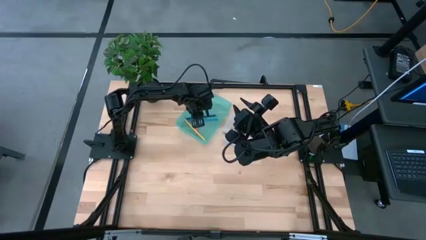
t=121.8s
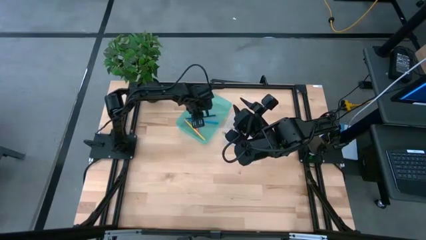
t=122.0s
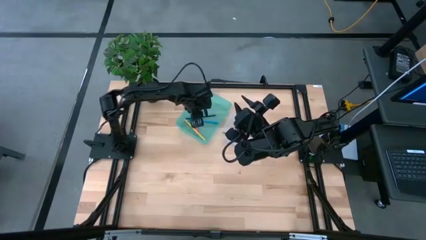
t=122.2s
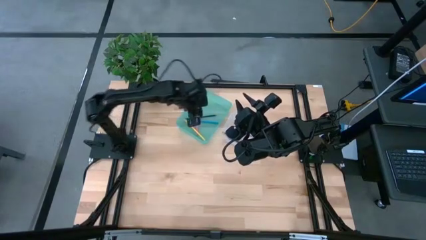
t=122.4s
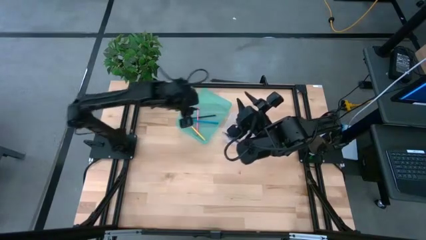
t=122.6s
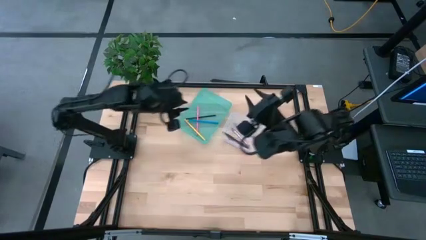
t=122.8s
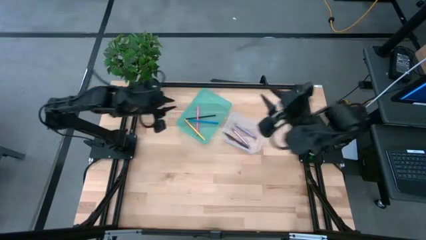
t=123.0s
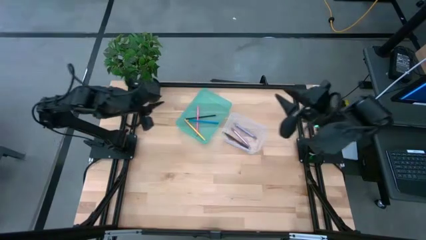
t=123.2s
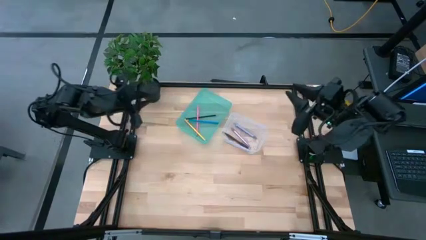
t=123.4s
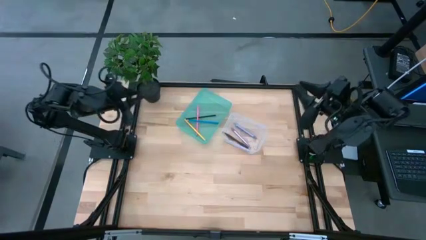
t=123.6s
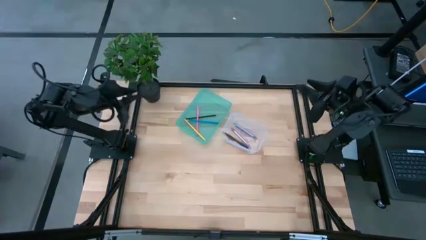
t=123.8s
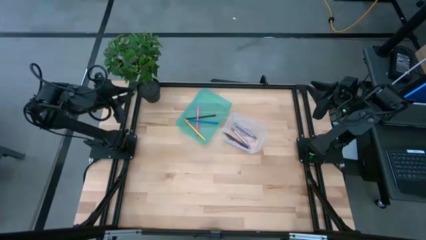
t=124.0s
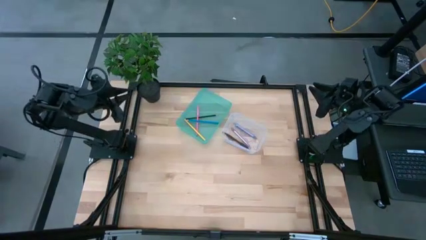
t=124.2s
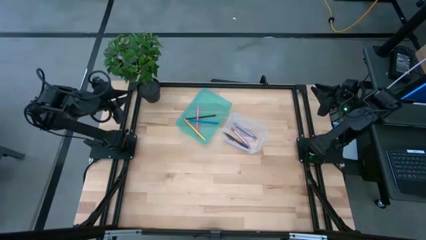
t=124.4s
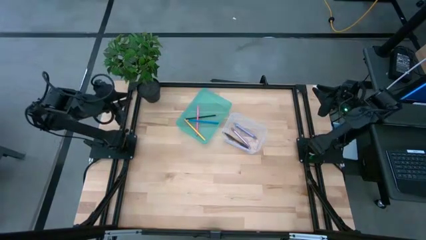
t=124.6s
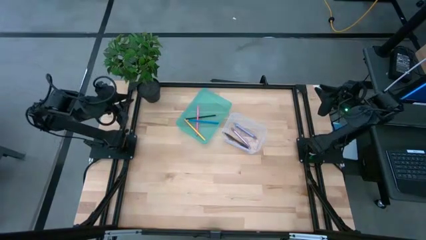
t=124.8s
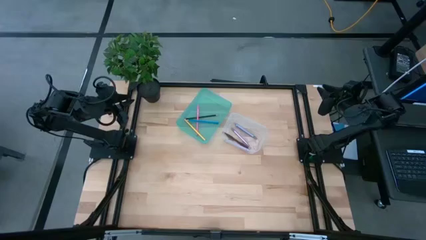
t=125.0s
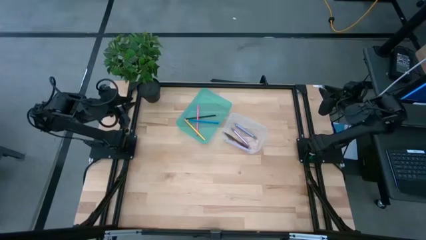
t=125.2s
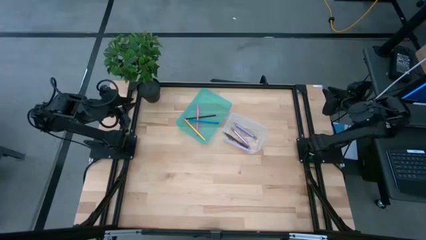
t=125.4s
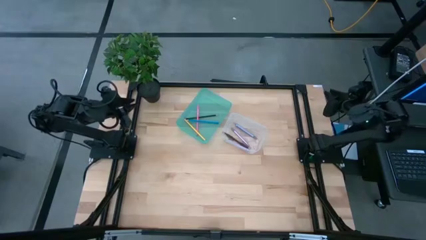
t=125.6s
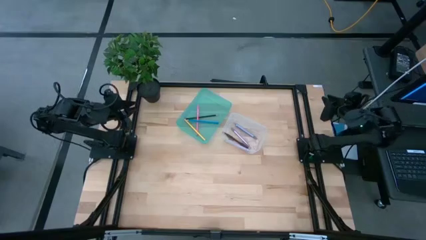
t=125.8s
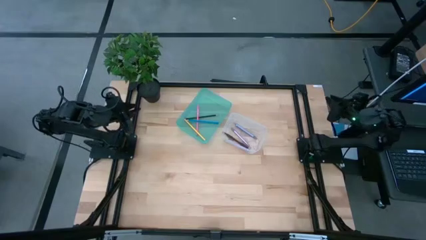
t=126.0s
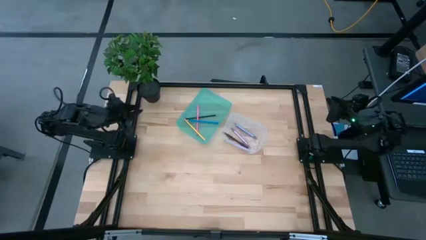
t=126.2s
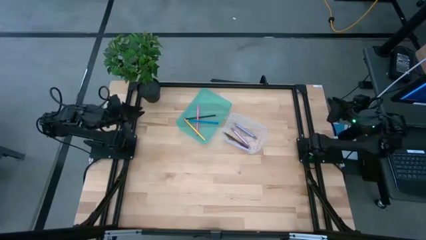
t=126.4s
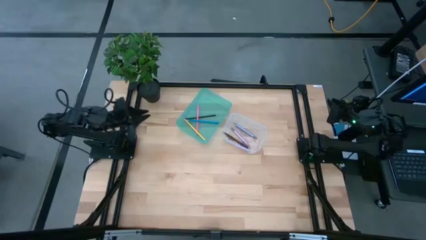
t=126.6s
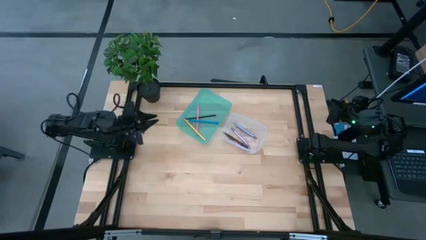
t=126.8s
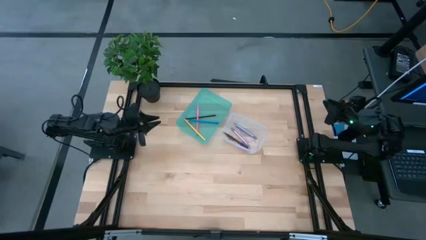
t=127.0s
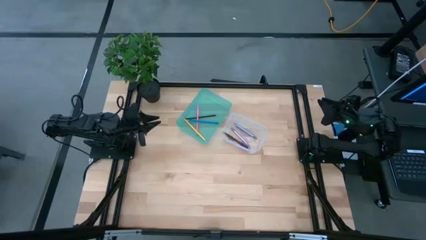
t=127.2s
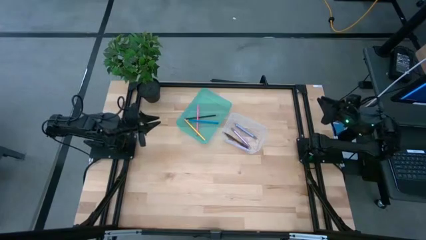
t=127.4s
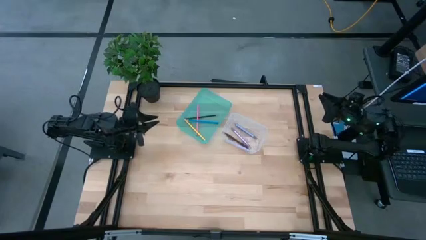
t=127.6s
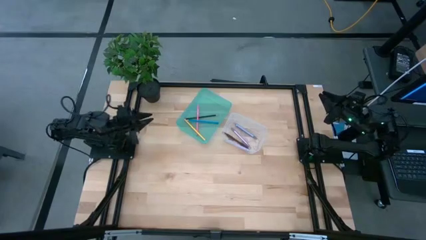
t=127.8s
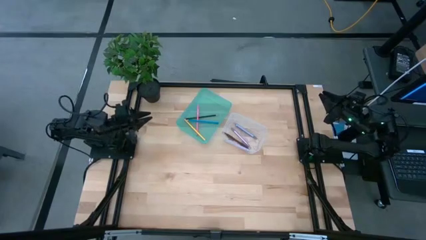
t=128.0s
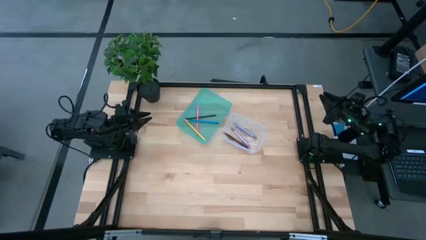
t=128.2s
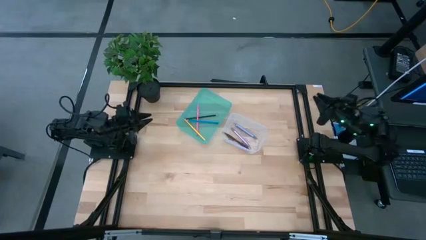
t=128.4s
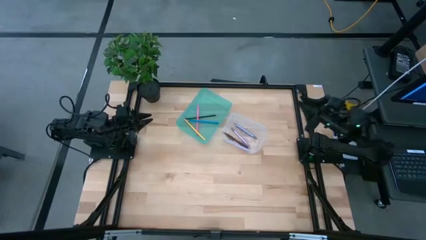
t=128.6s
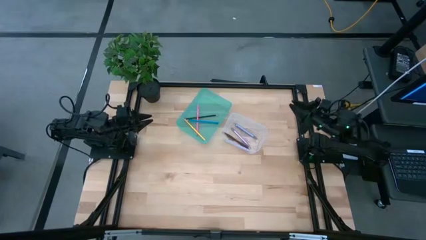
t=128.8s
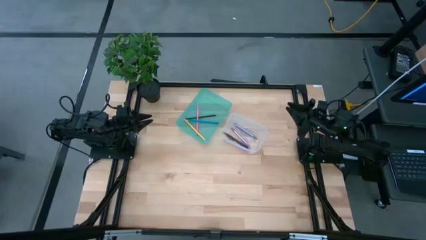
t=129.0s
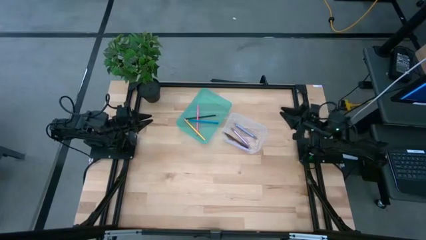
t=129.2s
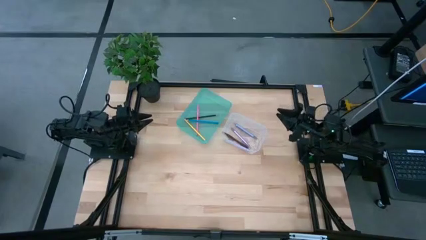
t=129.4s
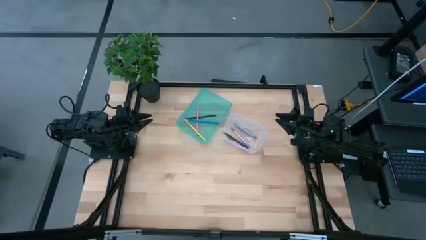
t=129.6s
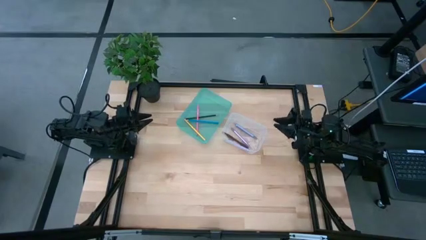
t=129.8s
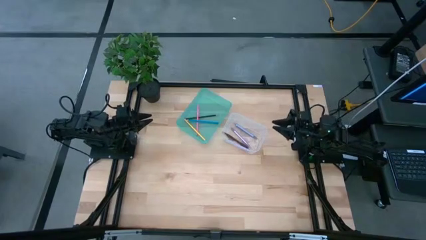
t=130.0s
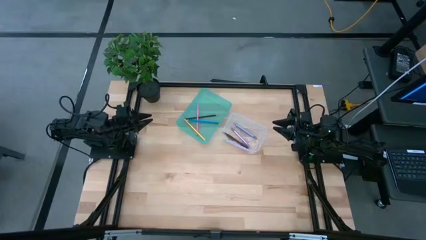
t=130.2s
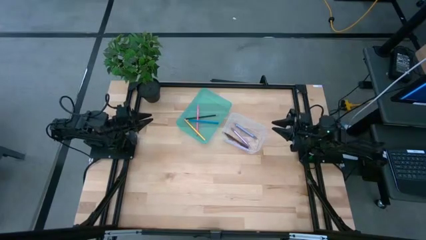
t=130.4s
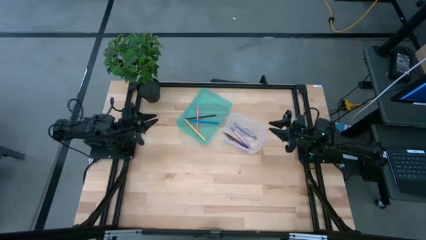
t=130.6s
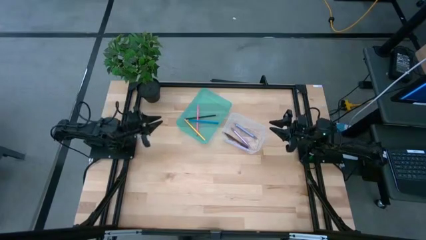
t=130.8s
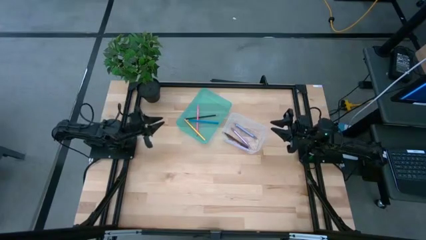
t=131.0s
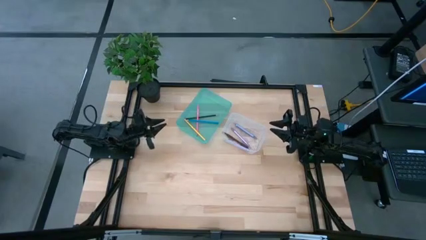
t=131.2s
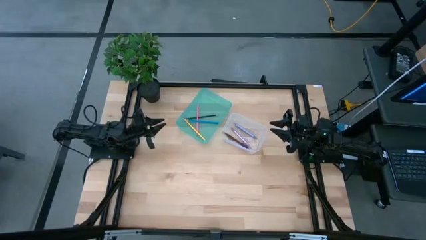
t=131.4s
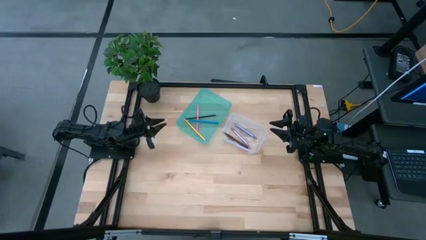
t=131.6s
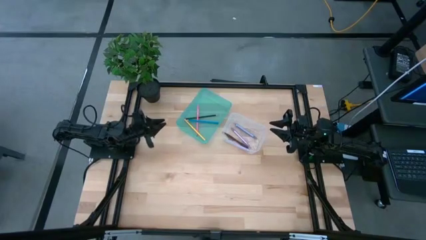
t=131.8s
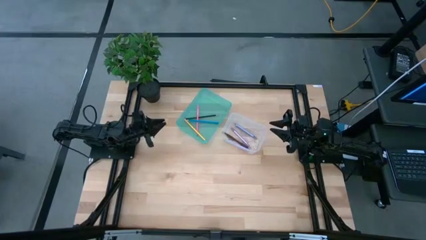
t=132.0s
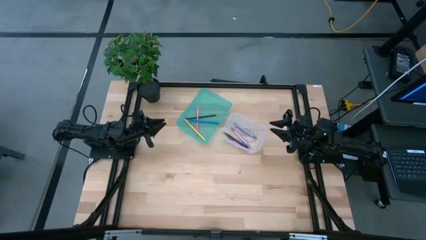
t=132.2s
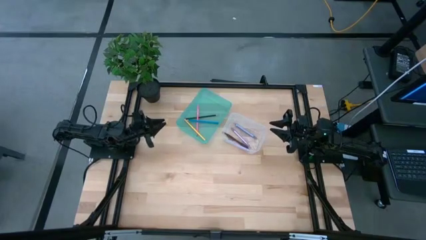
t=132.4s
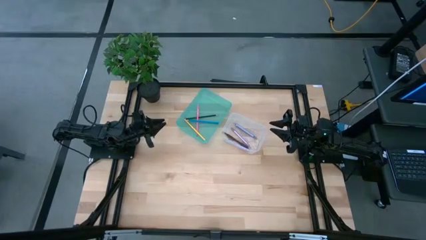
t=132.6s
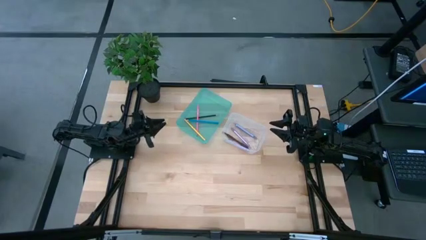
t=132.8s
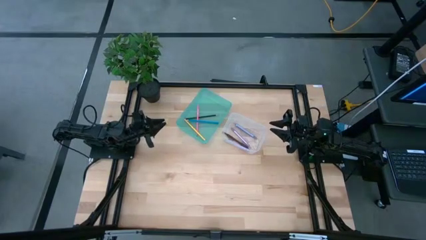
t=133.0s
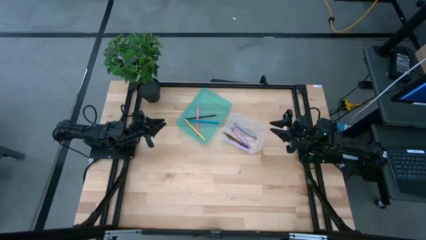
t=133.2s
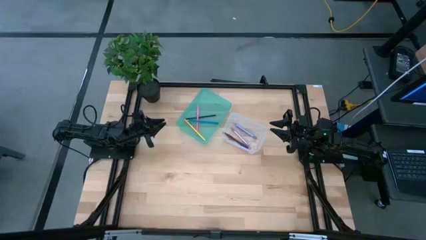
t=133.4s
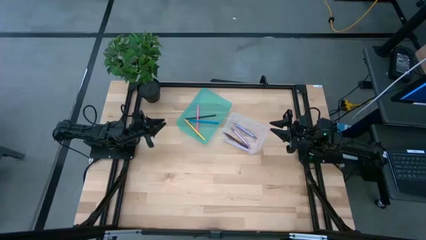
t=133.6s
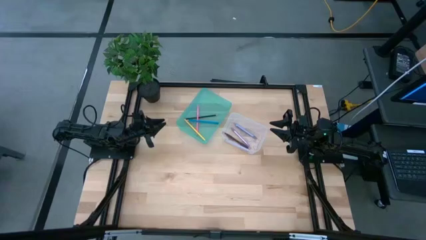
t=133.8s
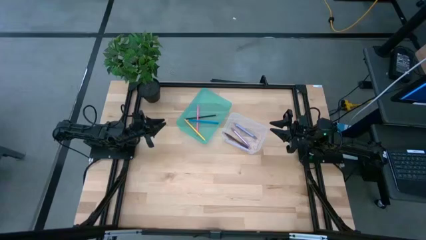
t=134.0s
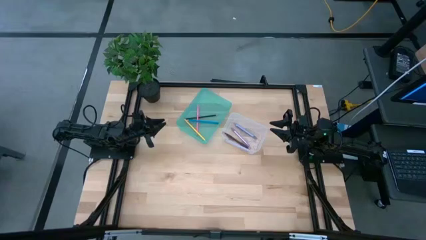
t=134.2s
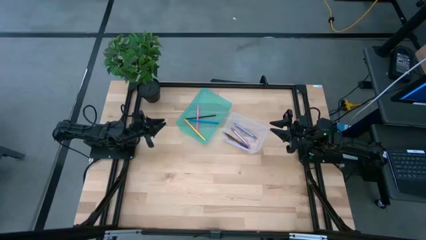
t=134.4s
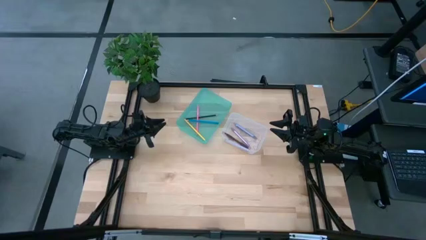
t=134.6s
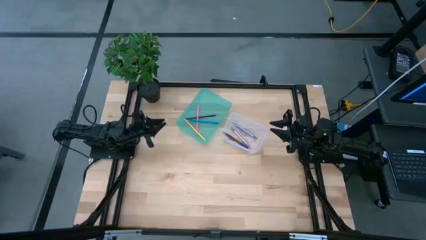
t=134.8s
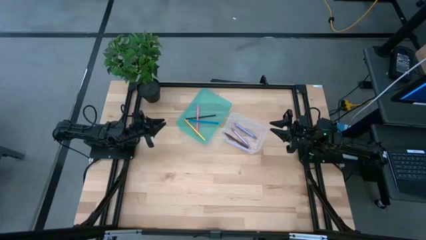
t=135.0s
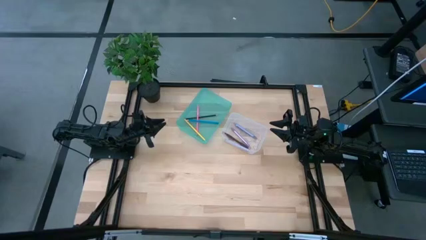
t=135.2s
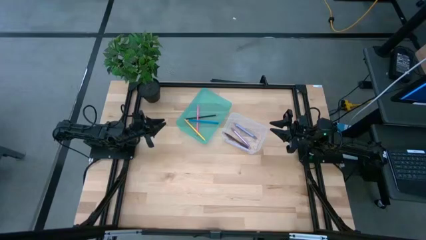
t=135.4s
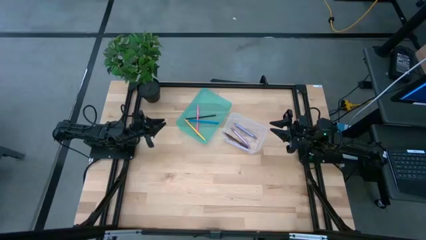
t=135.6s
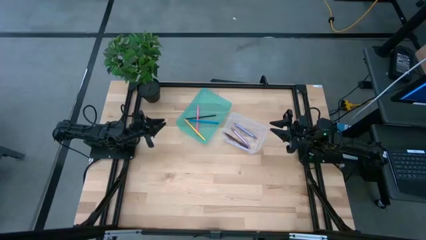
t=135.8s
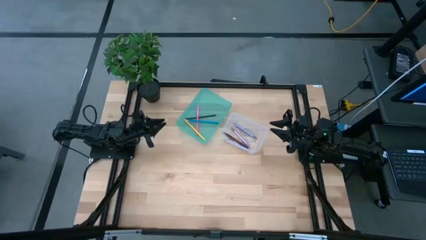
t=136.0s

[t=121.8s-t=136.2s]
Task: Sort pens & pencils
Return to Home Position

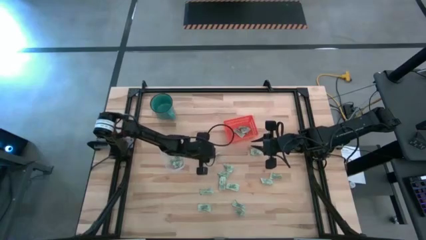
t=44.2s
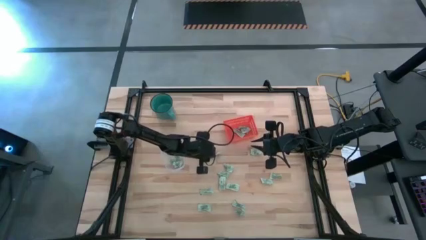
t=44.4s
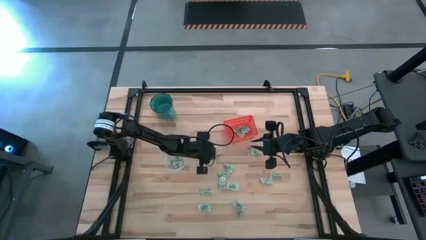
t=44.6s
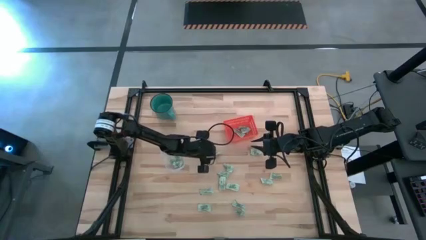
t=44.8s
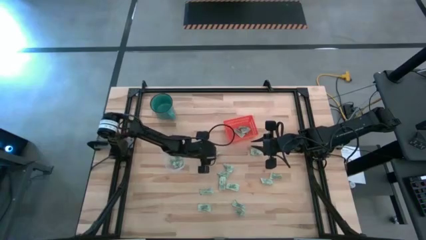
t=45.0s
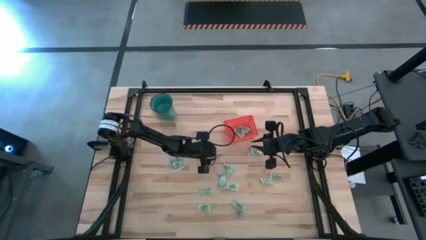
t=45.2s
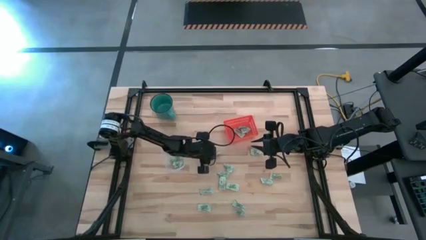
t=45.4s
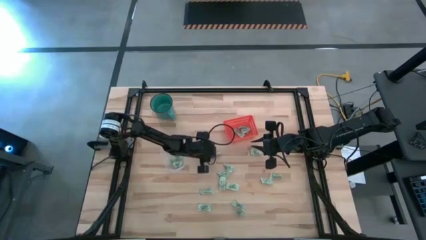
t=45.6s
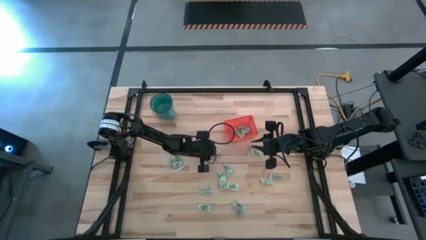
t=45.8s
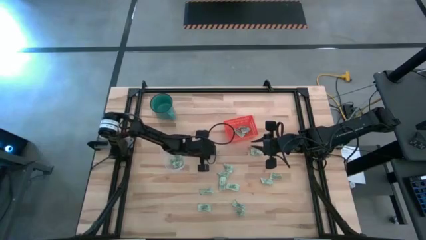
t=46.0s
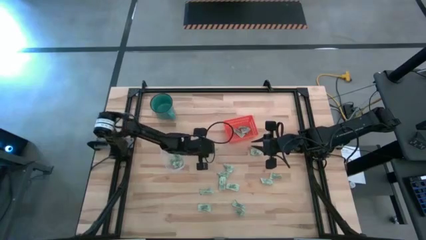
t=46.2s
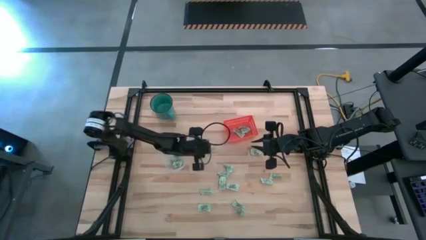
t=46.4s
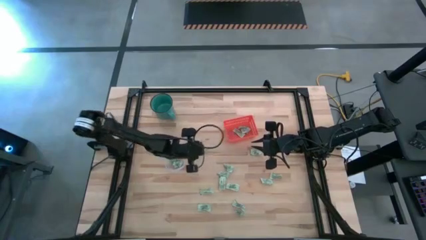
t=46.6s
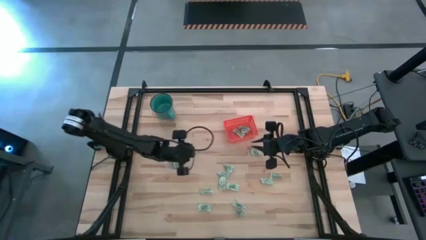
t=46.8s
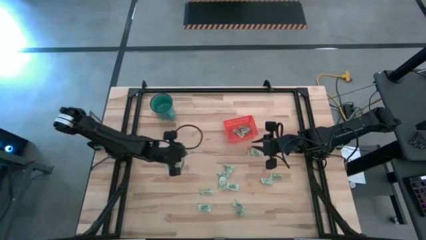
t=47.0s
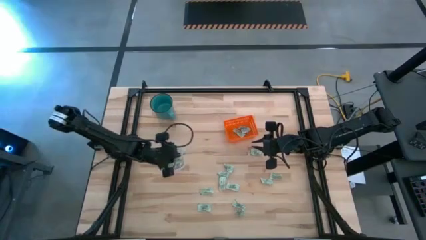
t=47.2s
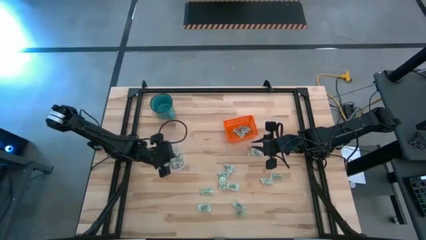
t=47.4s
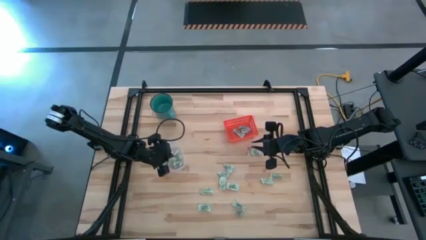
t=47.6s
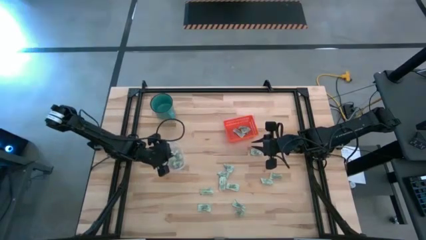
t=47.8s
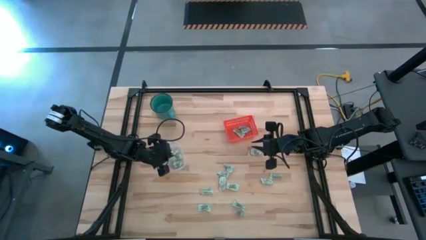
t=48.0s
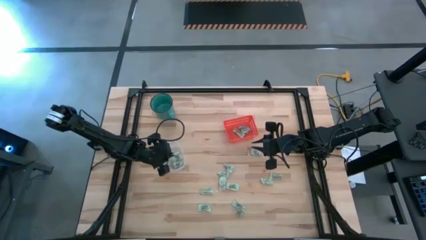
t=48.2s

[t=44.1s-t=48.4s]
Task: Pick and place items into bin
Put the light green stevia packet into the transparent container
